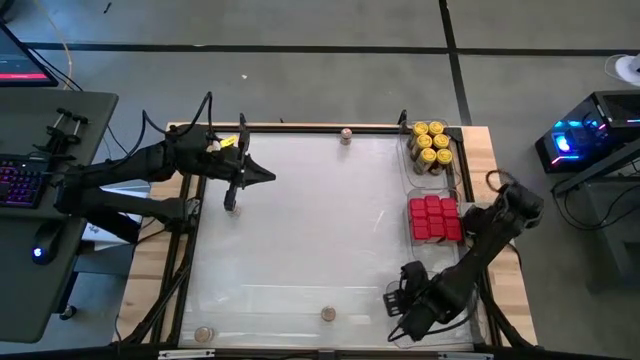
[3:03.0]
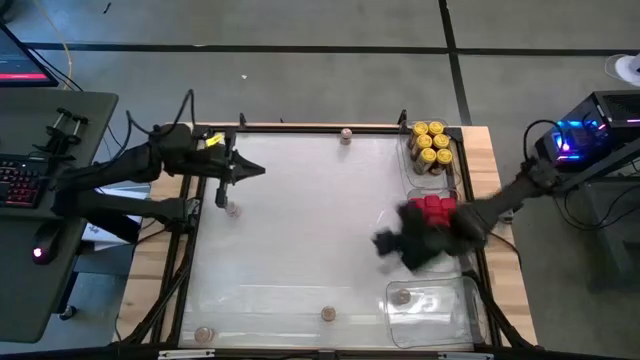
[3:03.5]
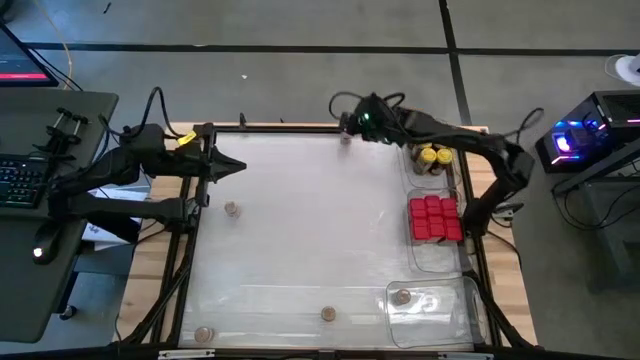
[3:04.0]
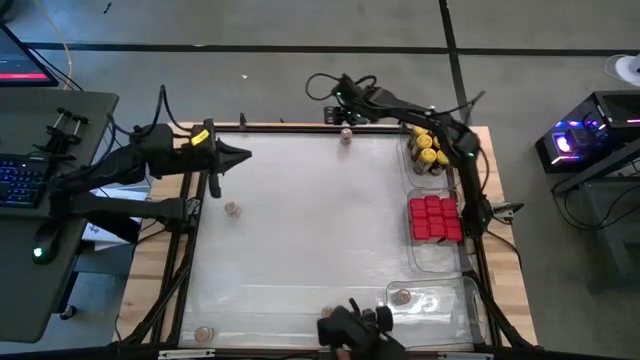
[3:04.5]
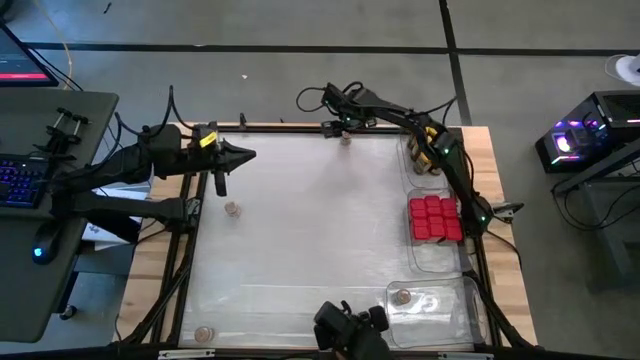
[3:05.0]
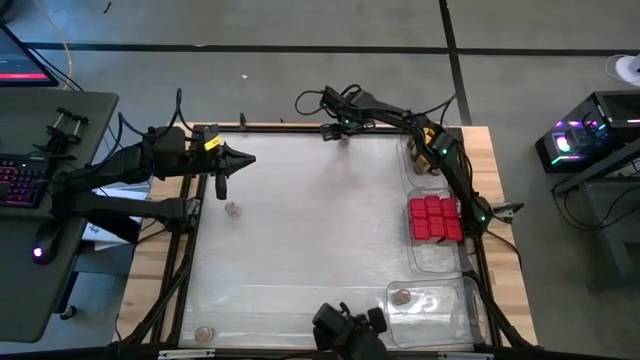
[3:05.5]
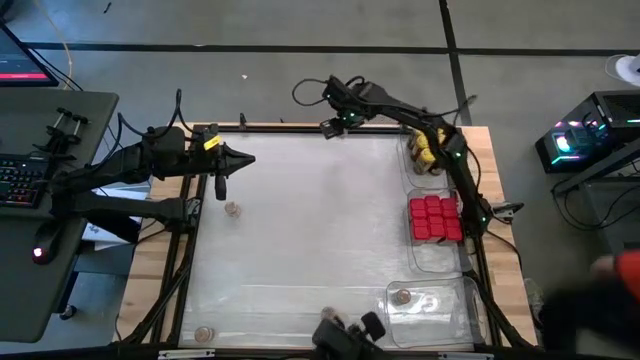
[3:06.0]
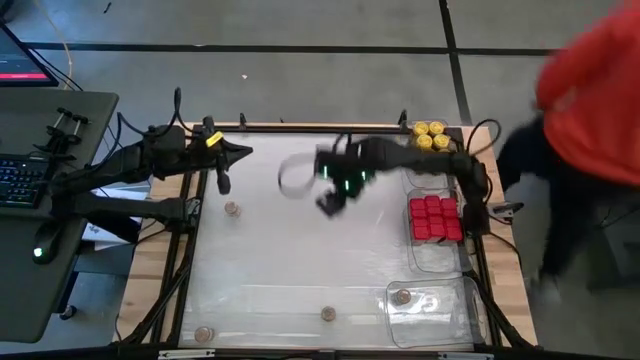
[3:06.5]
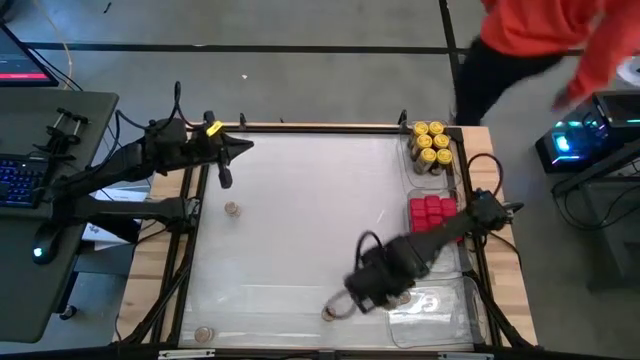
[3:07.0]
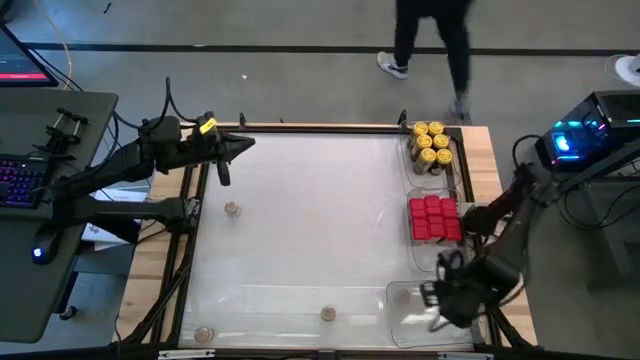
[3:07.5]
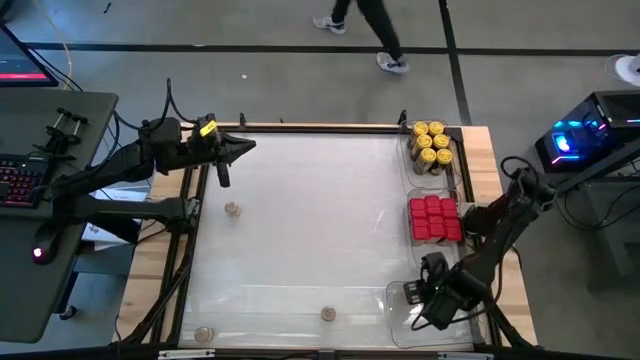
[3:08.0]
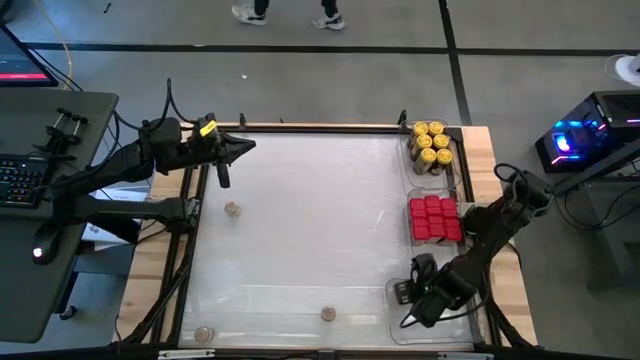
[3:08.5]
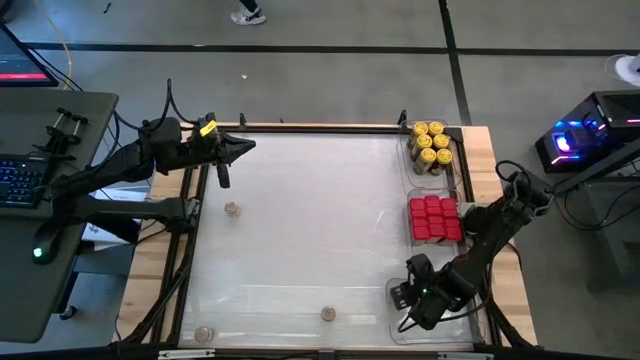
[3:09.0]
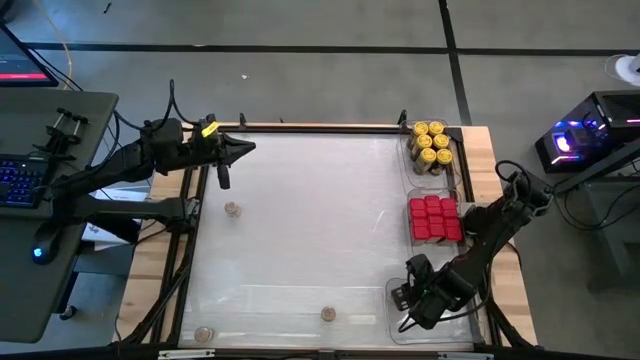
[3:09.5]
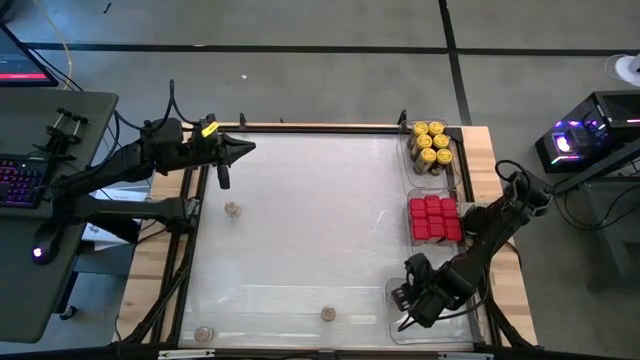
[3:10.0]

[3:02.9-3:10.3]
Task: Sort spices by type
Put the brown seasoning bottle into the bottom transparent bin

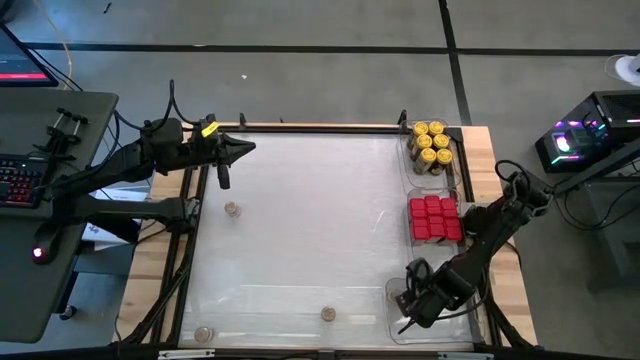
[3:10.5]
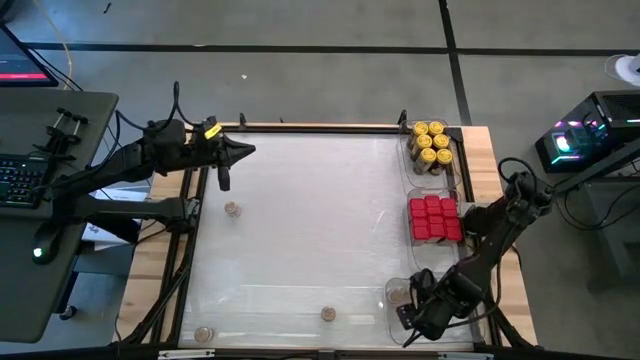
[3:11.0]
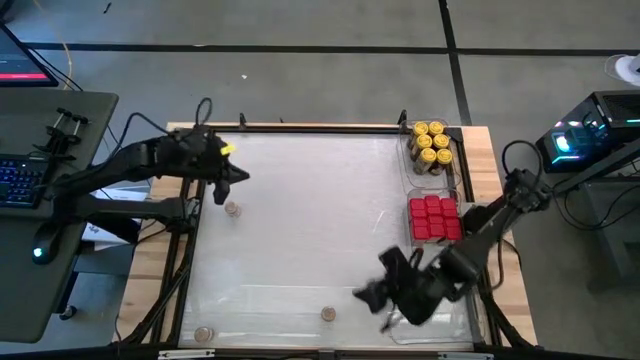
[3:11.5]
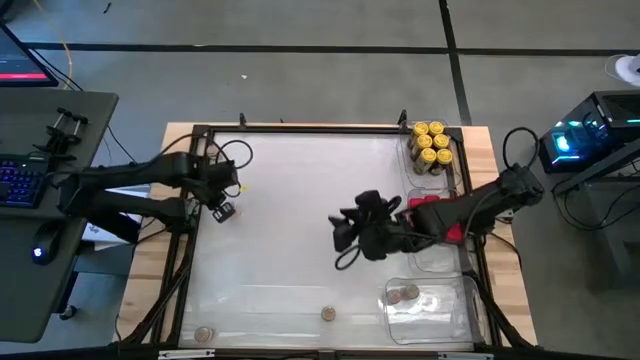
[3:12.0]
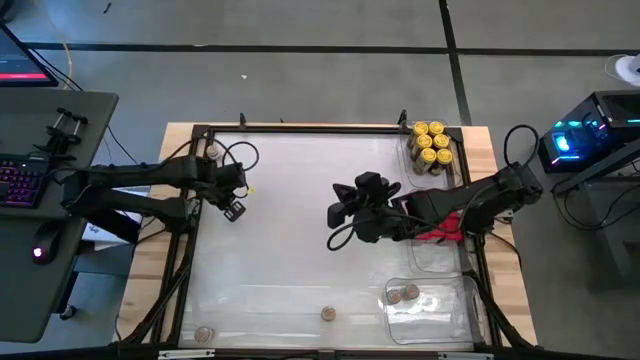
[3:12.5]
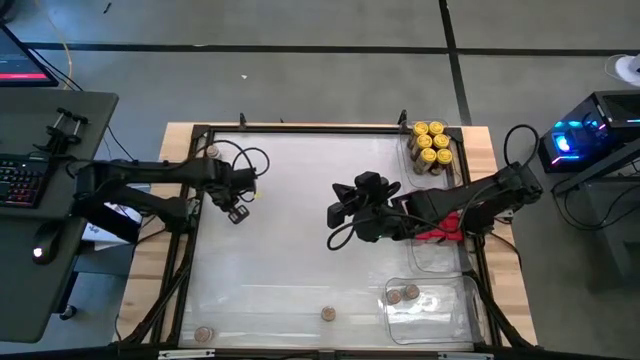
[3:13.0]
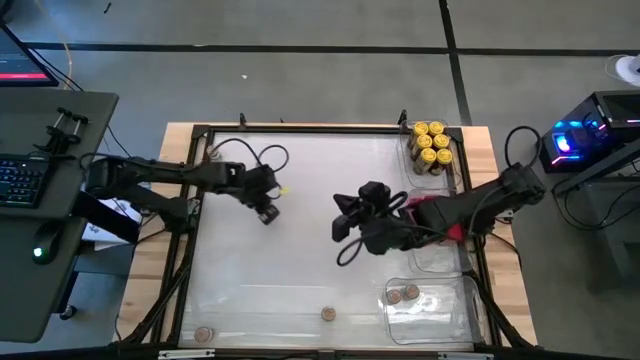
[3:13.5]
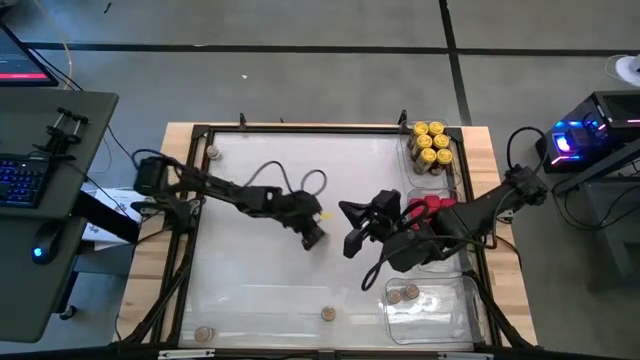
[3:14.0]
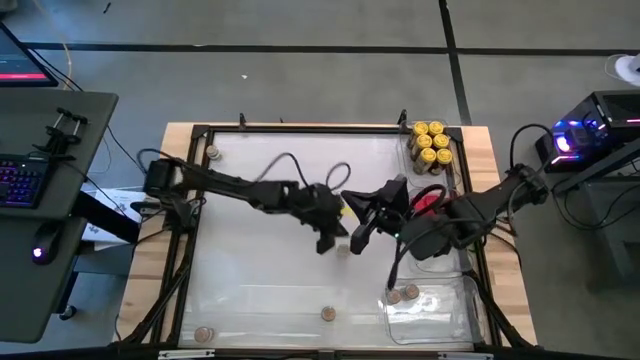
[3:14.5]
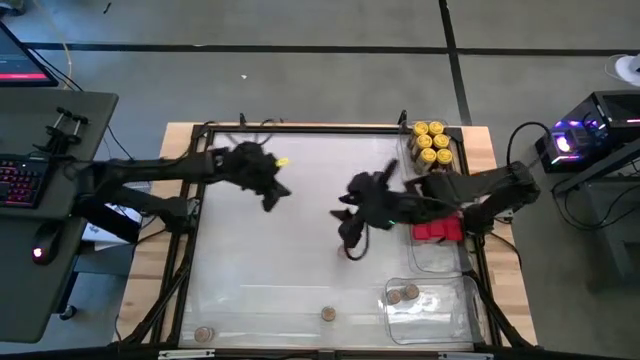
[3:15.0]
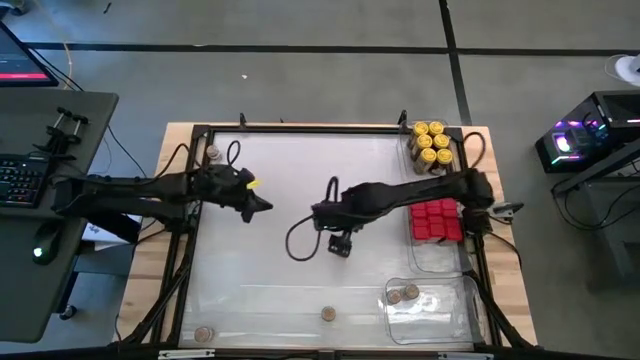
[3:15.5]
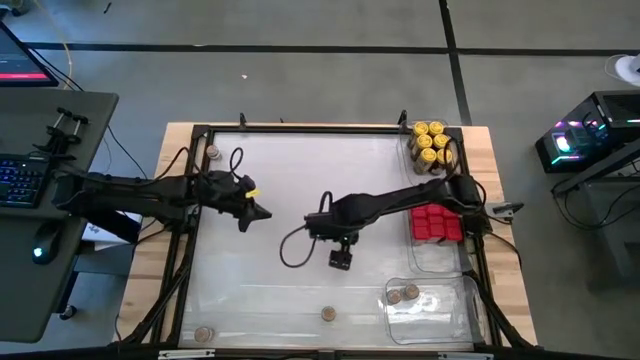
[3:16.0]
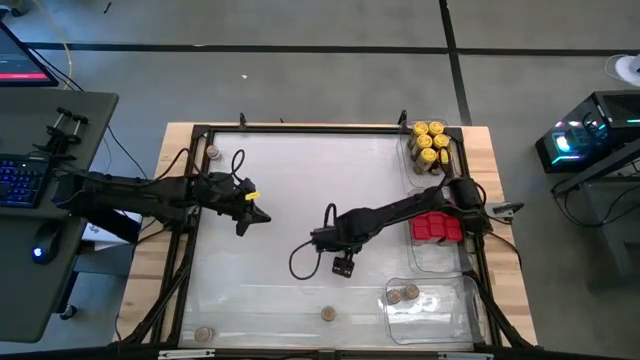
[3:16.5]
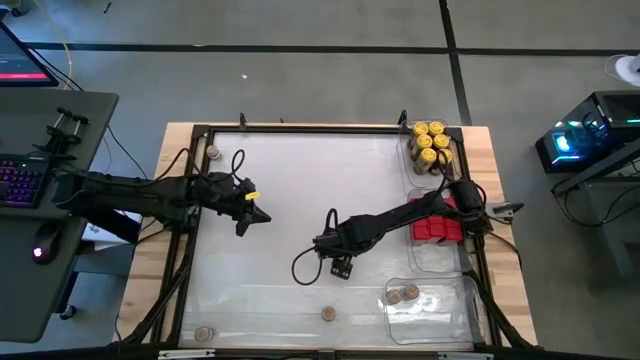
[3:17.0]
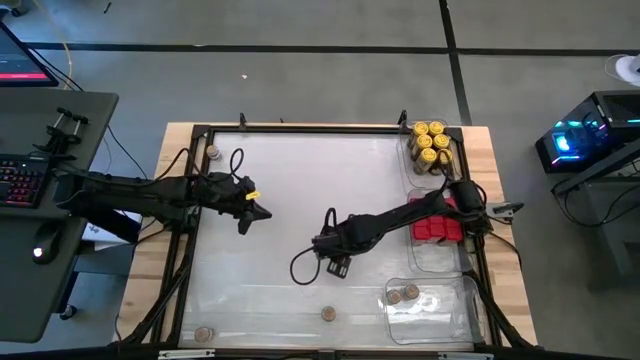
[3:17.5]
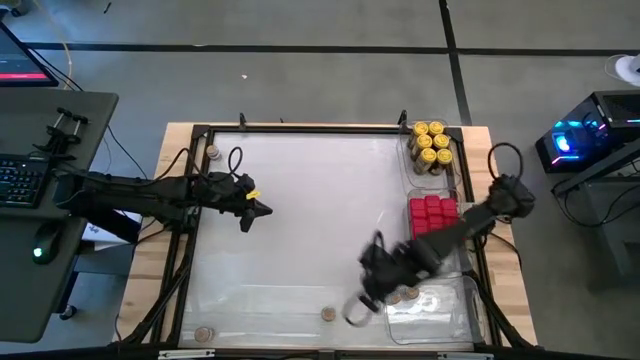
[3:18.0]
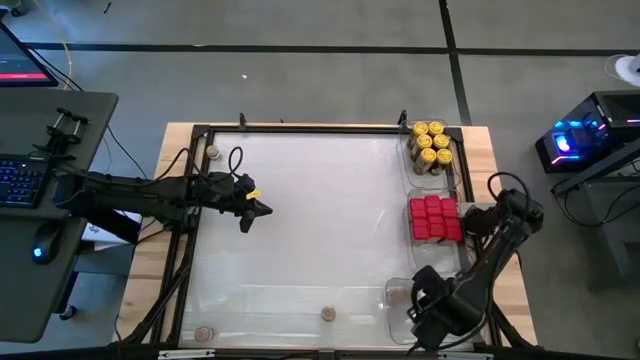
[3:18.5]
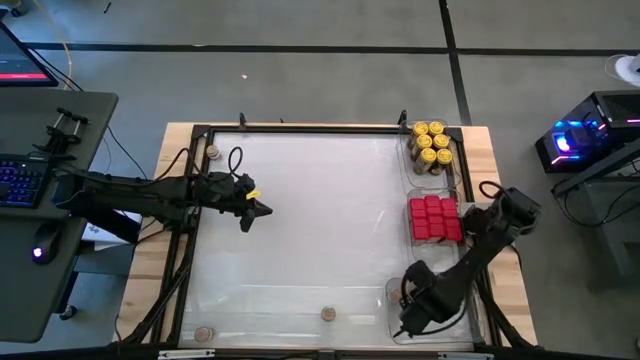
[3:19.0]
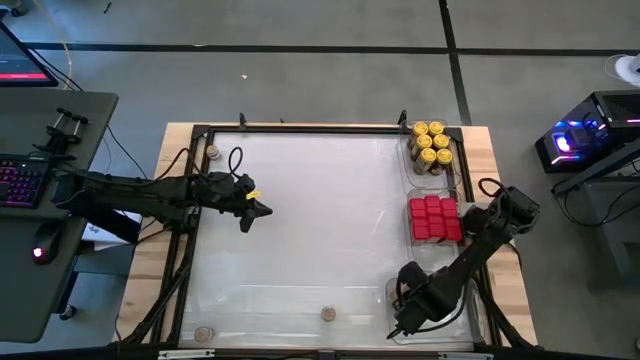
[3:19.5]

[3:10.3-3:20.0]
Put the brown seasoning bottle into the bottom transparent bin

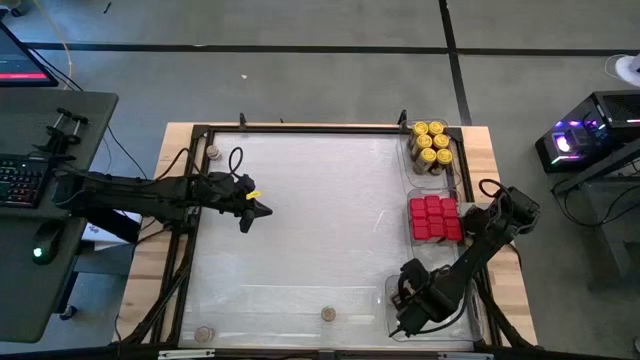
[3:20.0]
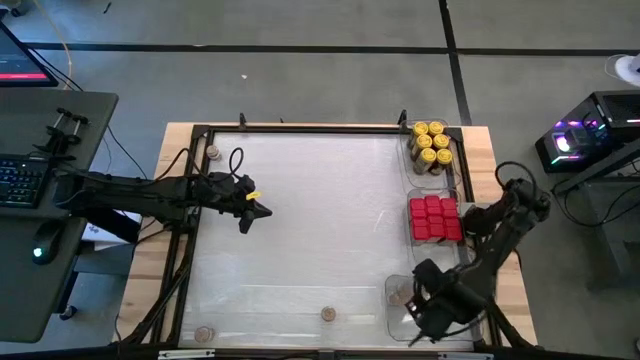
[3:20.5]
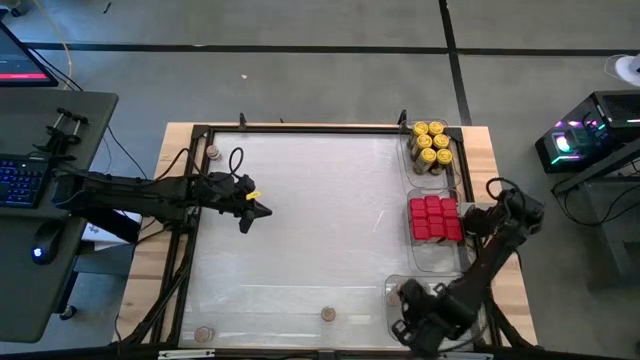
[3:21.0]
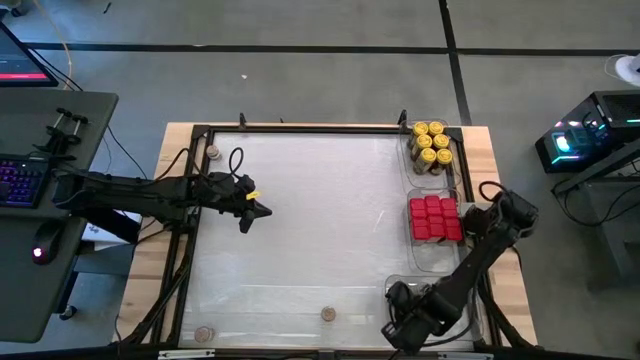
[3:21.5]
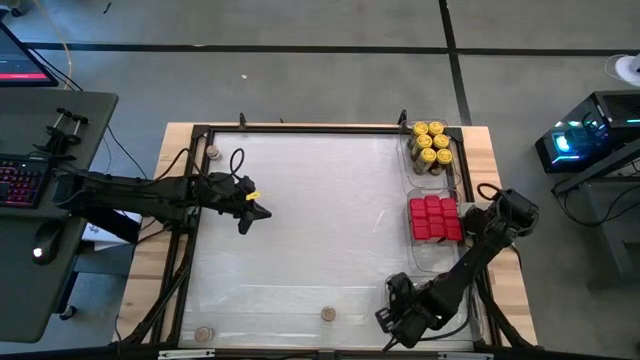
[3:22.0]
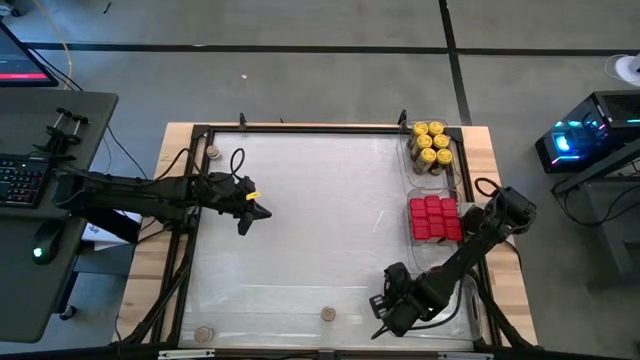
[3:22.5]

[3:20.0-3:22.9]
Adjust the brown seasoning bottle in the bottom transparent bin

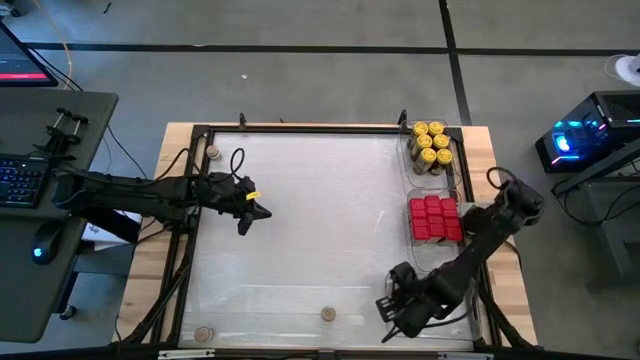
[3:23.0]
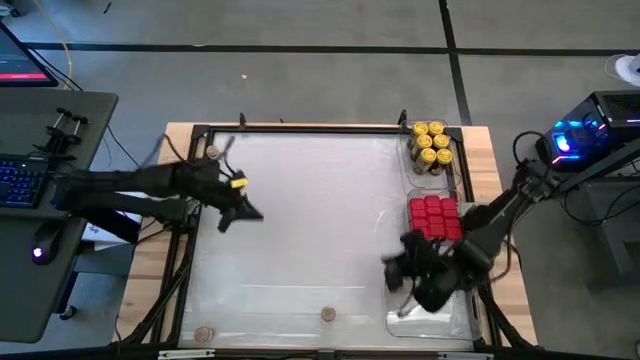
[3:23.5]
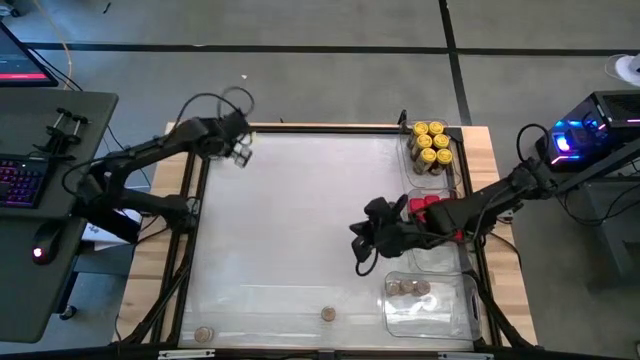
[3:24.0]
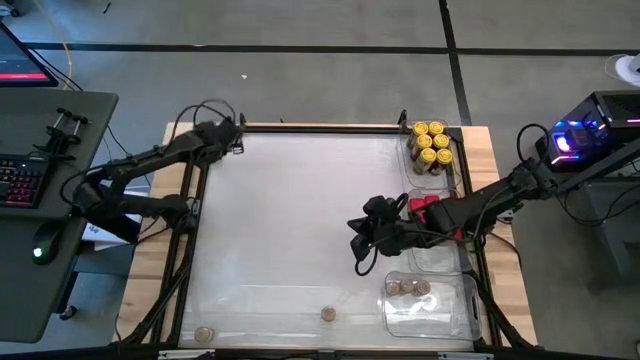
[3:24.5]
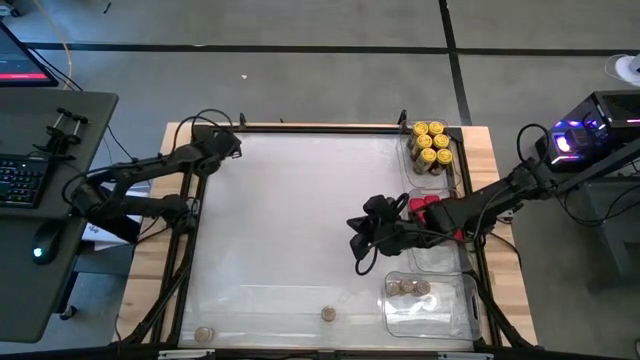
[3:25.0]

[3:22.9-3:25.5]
Put the brown seasoning bottle into the bottom transparent bin
